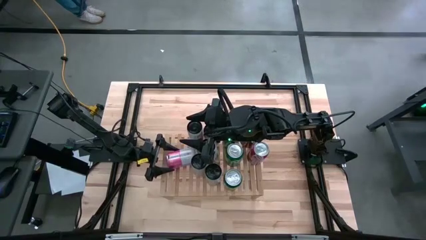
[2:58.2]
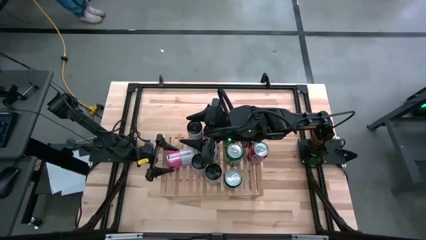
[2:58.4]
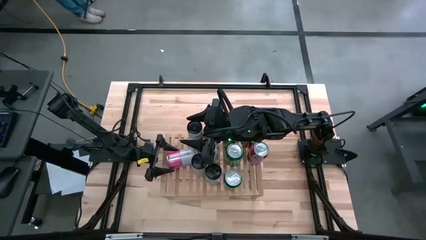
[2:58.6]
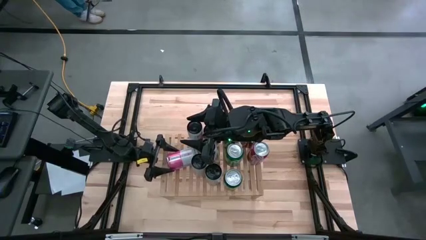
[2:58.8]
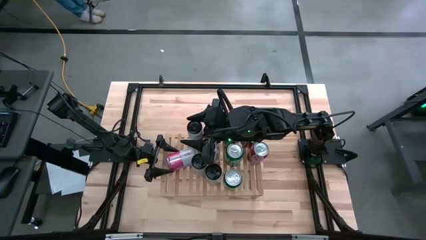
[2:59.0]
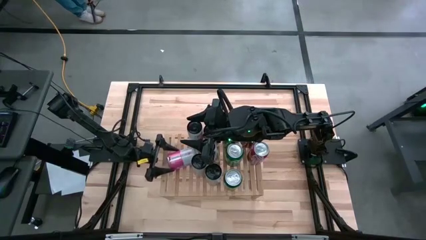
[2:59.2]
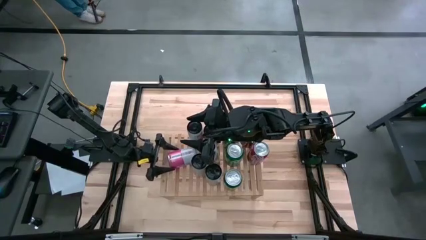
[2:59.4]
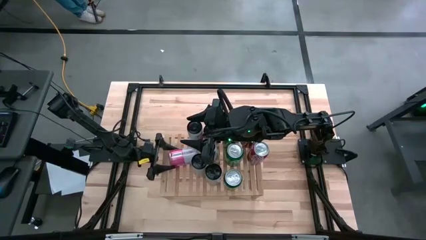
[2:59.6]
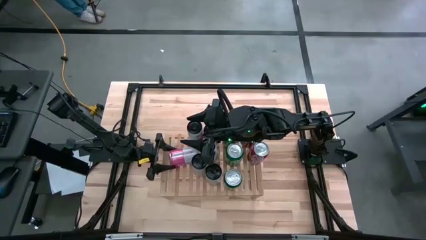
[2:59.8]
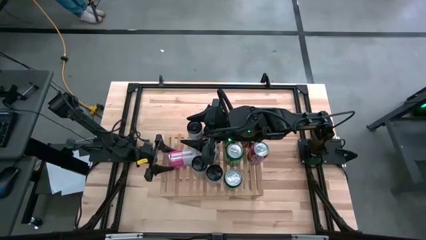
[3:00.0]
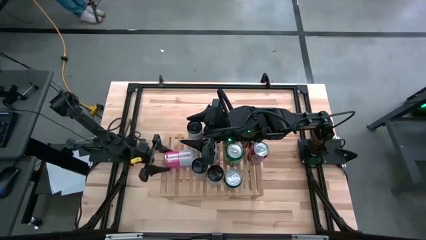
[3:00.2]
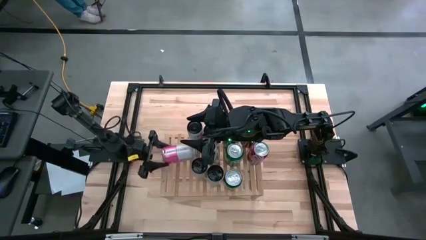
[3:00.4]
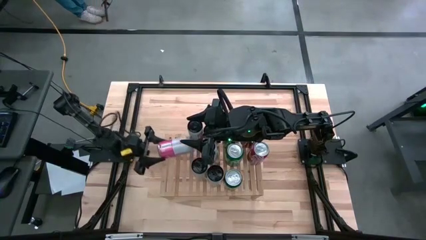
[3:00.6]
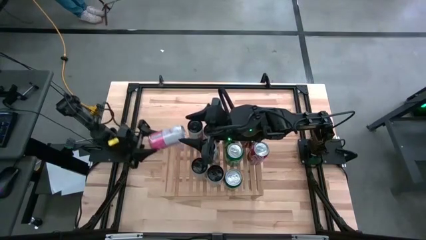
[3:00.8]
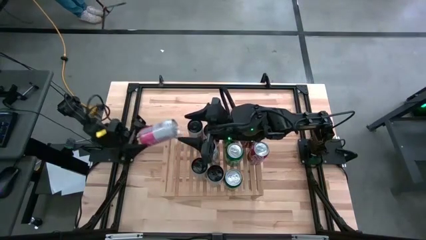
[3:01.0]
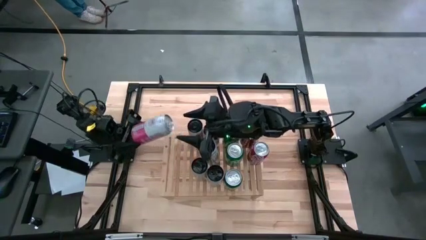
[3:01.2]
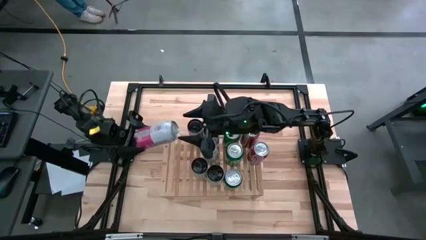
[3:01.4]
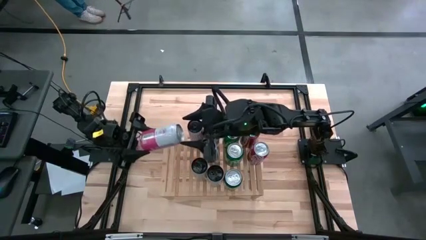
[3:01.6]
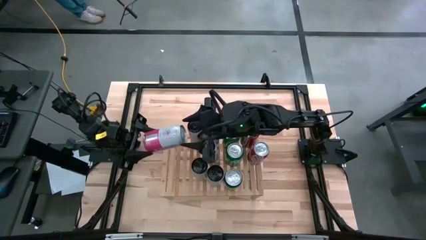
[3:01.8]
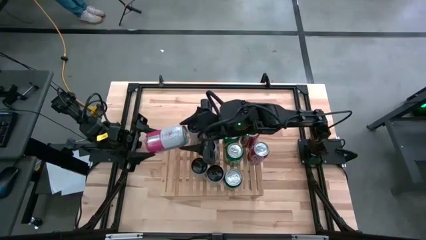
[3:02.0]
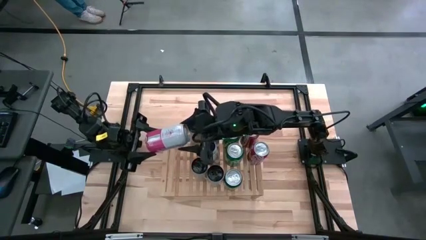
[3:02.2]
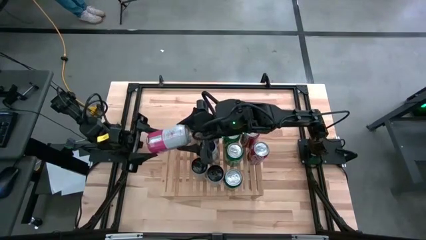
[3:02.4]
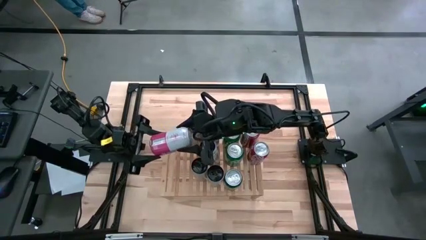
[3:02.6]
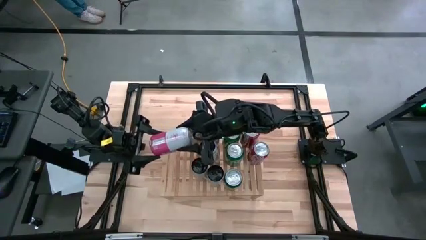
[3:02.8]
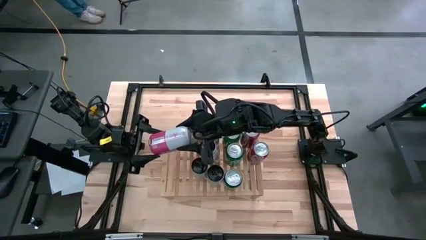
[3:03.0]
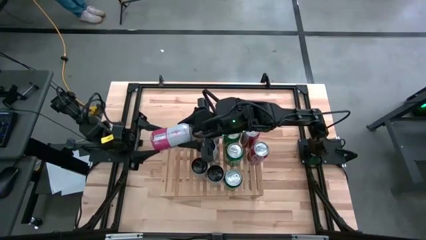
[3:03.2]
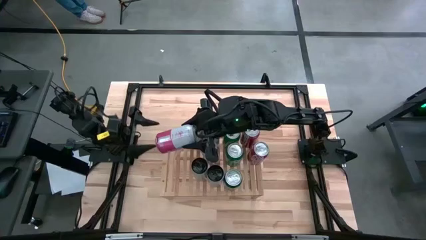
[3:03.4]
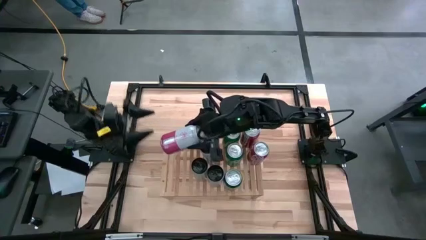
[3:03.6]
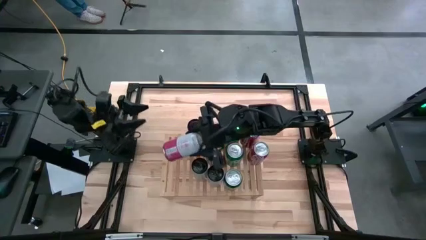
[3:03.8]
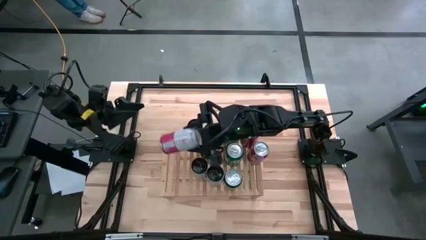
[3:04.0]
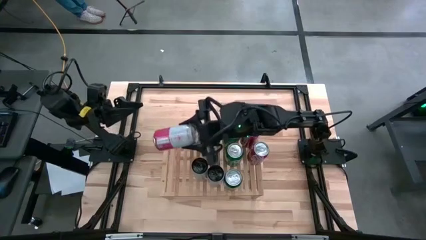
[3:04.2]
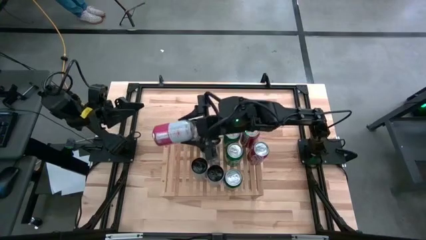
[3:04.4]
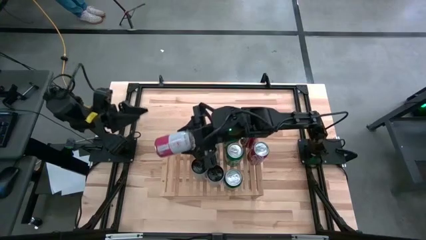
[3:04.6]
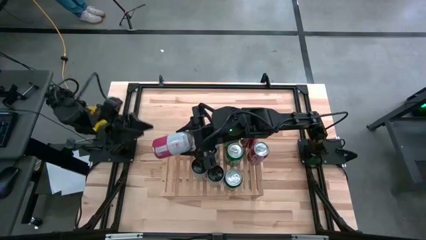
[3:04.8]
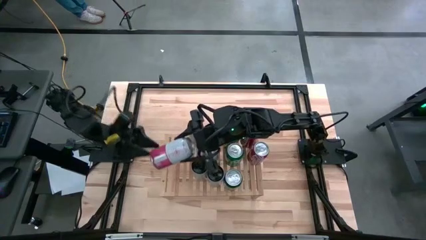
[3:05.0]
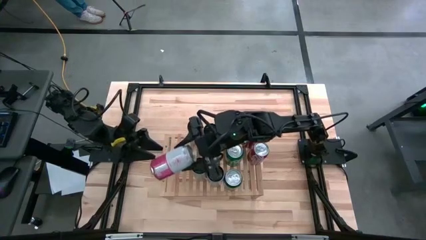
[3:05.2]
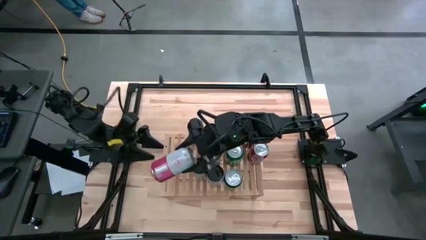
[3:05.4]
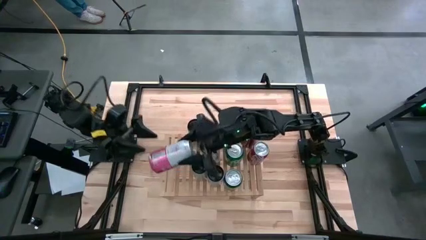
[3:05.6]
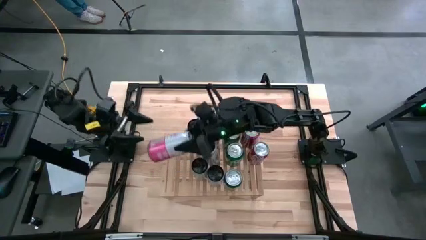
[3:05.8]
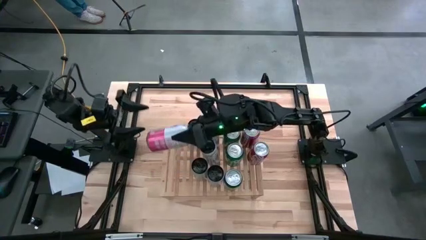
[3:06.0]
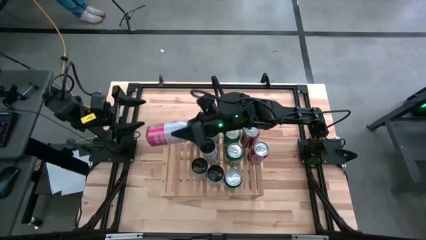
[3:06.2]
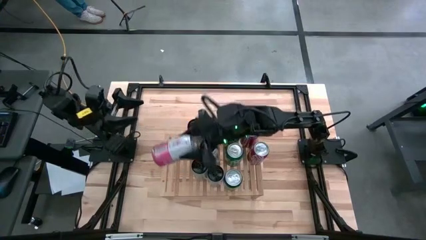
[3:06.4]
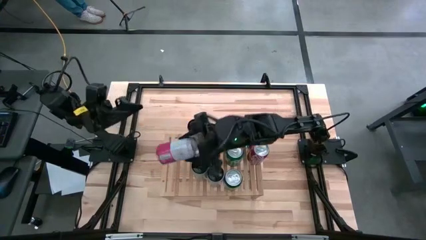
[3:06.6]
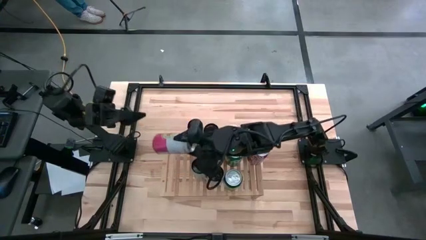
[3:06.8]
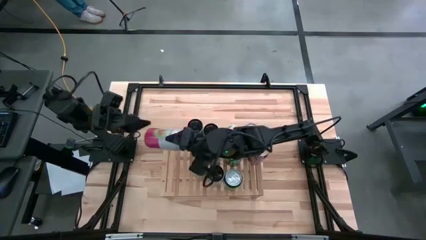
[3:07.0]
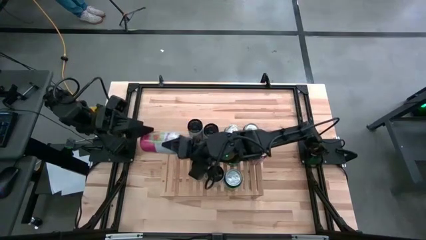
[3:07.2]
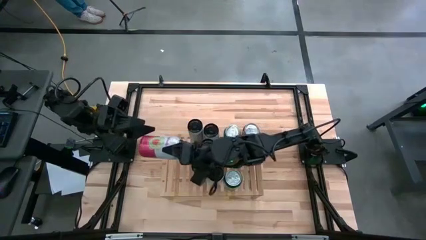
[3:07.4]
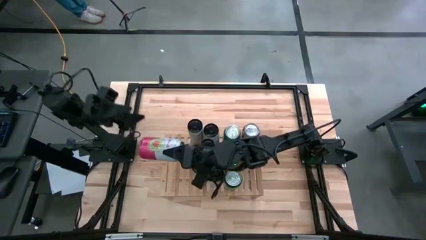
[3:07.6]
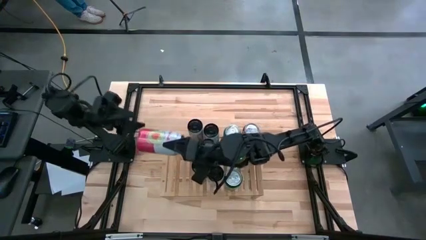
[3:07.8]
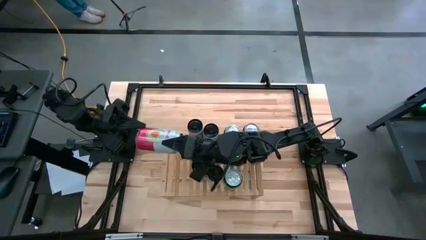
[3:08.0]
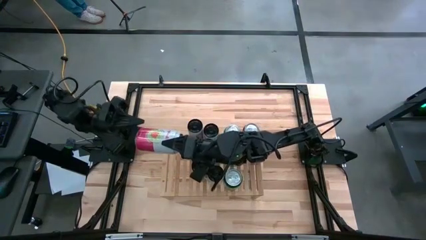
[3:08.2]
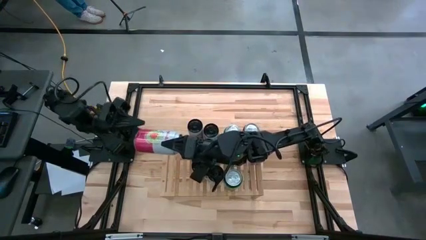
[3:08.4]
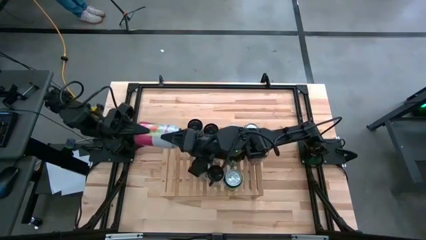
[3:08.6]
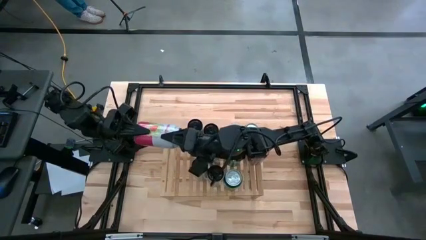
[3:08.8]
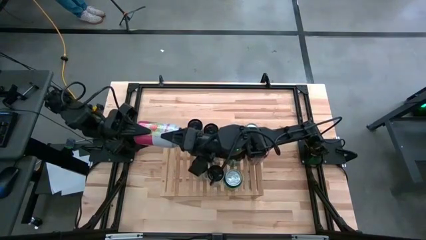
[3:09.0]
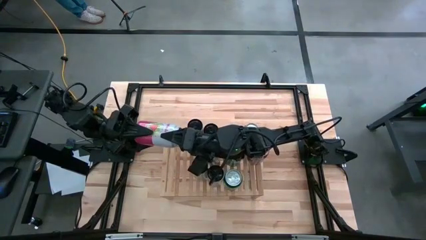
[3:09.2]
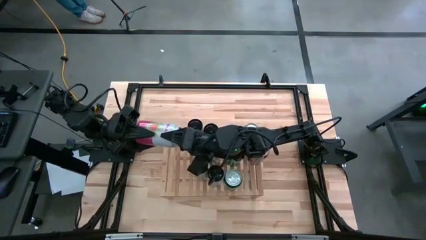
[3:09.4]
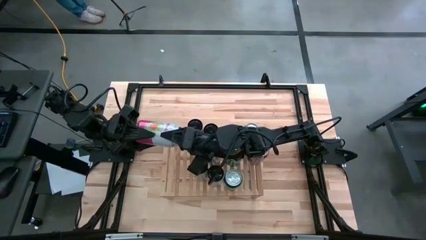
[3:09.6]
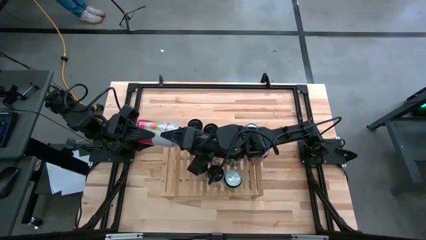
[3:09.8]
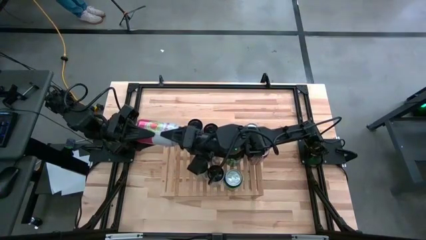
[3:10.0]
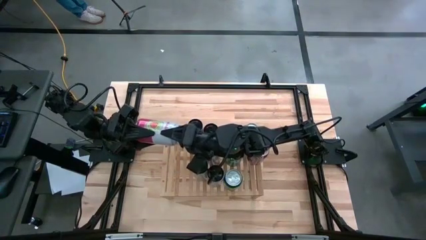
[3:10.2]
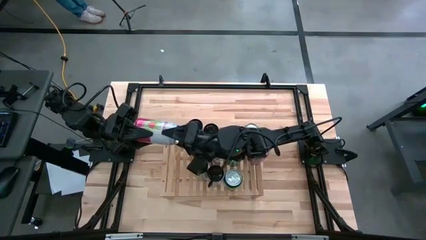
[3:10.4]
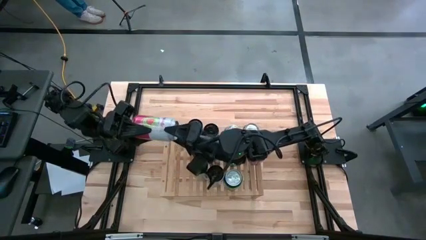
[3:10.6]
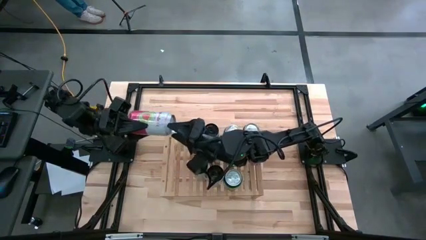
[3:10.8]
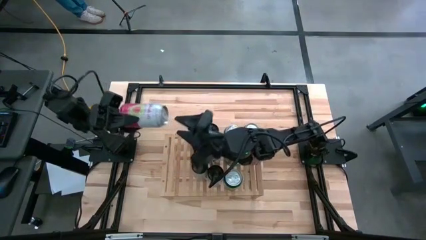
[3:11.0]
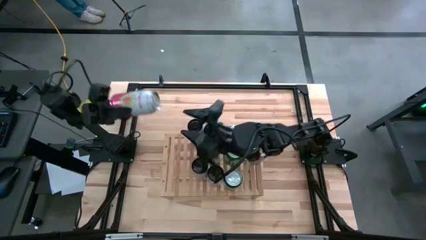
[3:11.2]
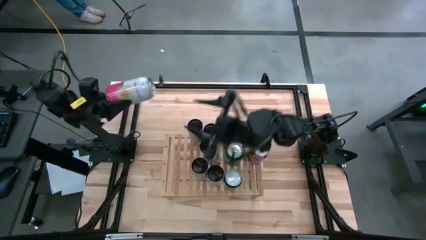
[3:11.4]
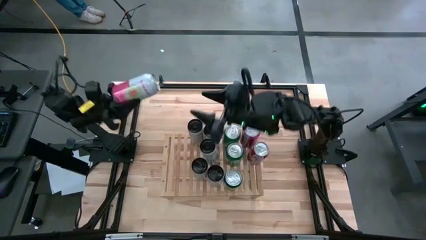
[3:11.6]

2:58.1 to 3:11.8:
Task: Place canned beverage on shelf
Put the pink-white soda can on the shelf

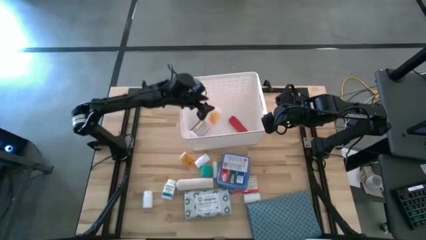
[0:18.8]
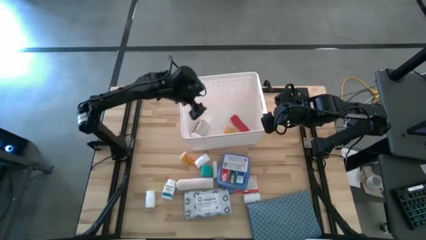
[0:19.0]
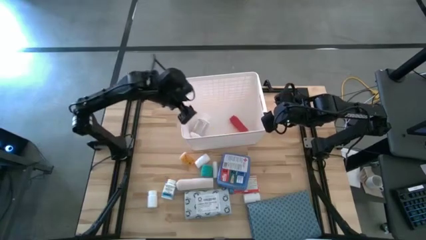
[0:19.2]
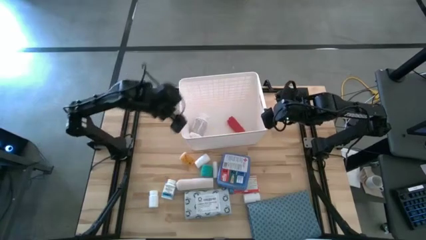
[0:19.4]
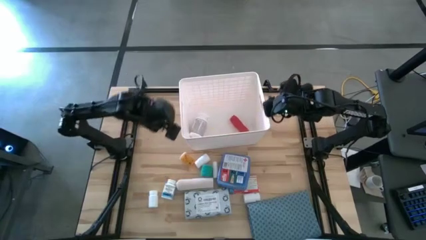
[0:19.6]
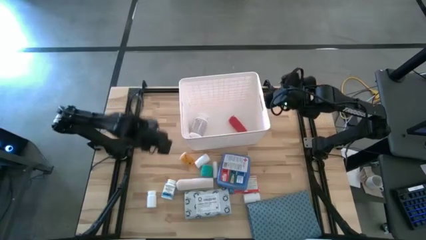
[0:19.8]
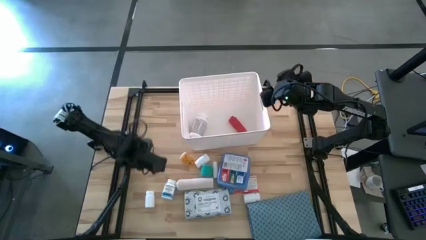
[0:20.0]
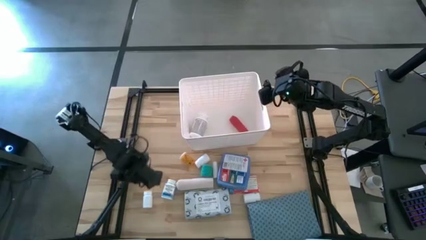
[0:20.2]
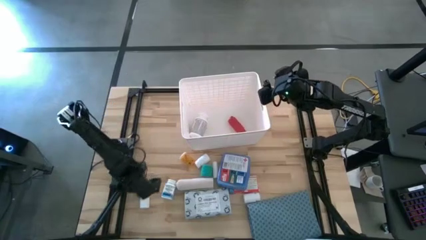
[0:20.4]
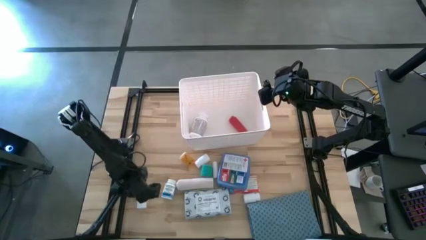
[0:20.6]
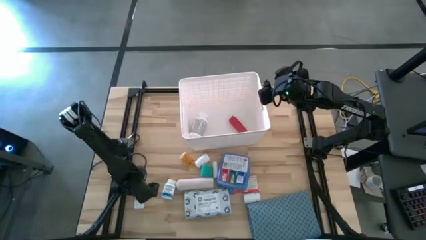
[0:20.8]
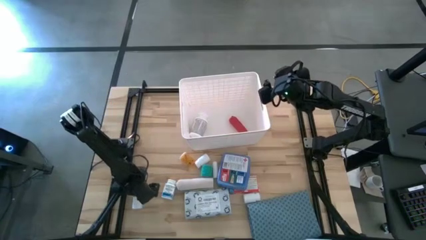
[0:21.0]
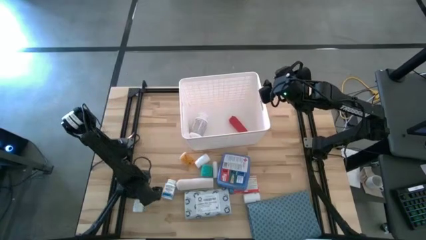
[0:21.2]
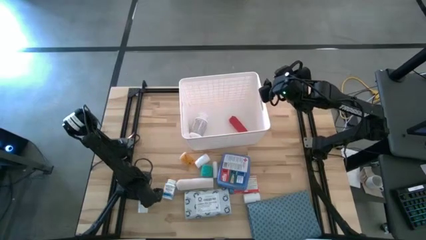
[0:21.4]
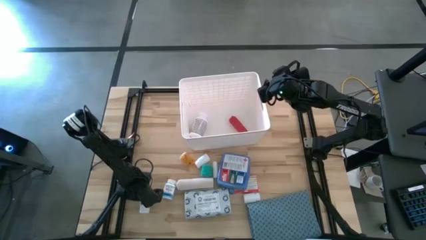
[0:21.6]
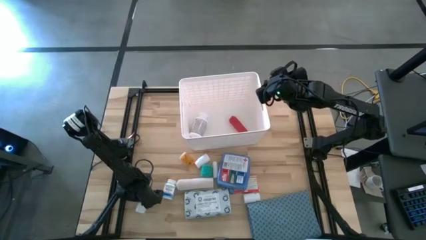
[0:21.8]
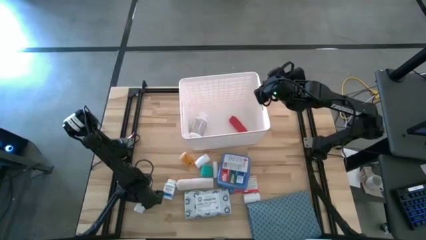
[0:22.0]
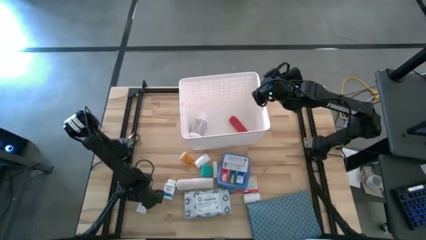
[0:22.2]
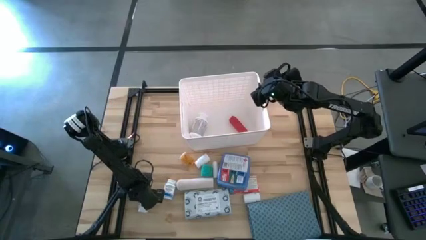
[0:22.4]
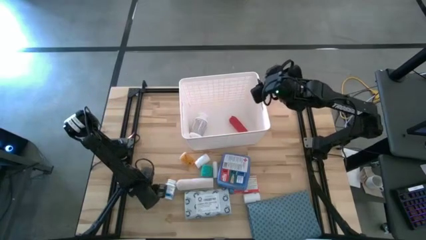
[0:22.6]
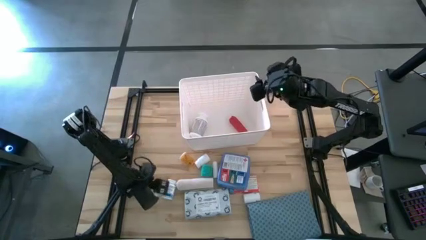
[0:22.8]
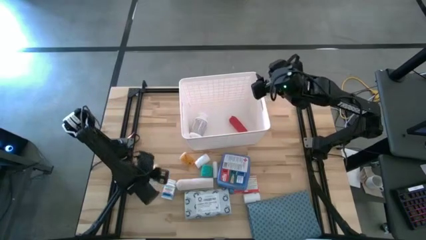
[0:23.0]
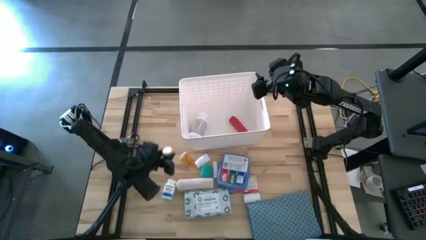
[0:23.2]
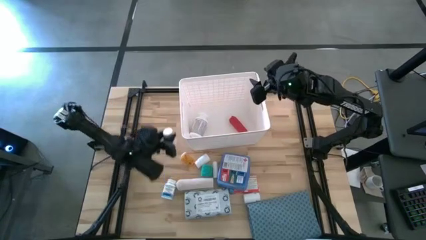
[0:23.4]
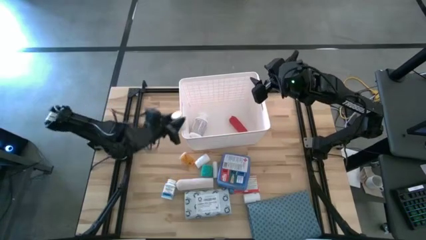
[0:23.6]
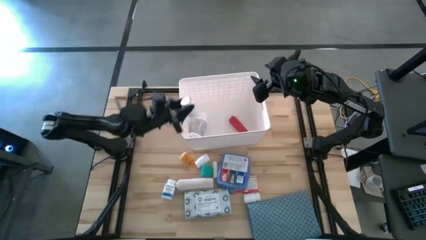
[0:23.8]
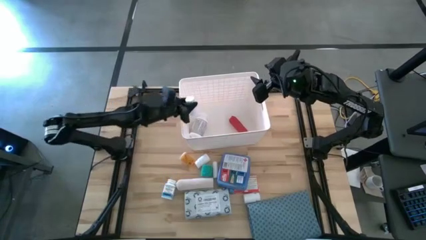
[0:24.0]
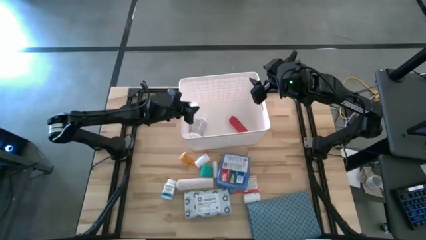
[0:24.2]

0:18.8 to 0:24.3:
Task: Pick & place medical supplies in basket/bin
Put the bottom left white pill bottle into the white bin
